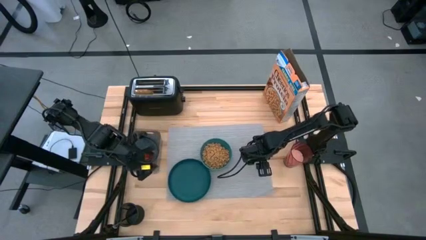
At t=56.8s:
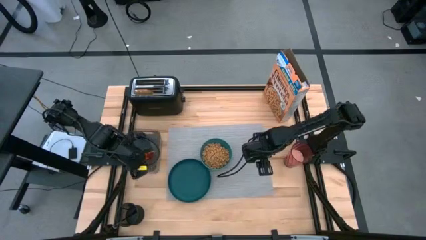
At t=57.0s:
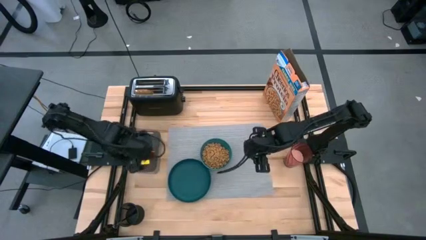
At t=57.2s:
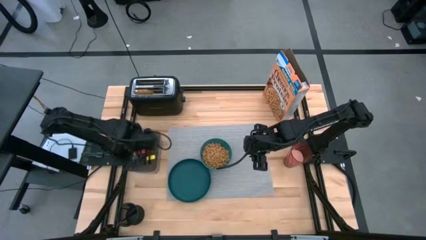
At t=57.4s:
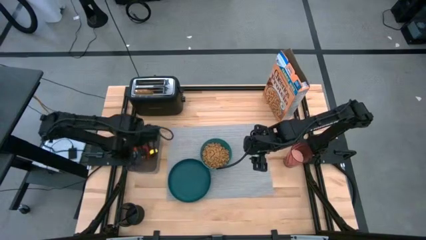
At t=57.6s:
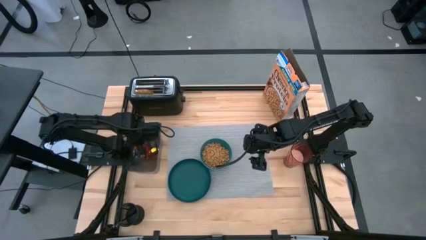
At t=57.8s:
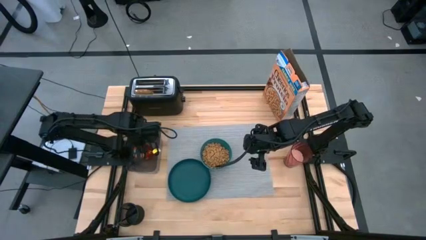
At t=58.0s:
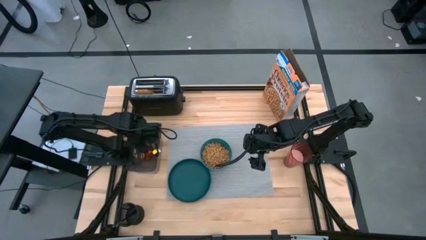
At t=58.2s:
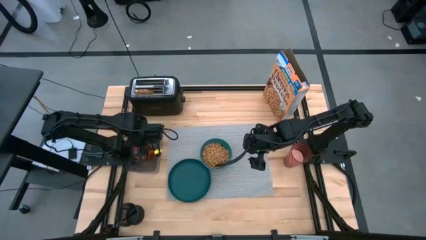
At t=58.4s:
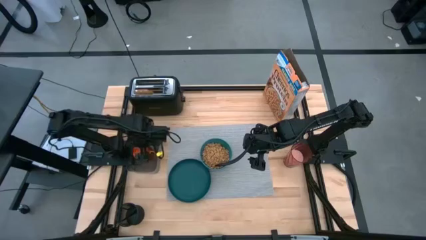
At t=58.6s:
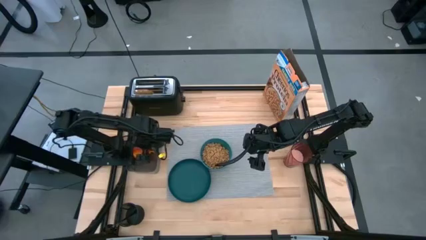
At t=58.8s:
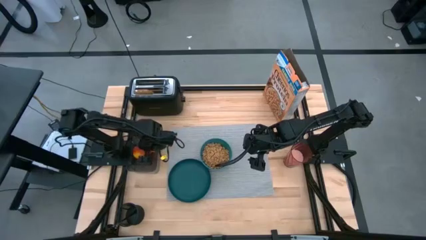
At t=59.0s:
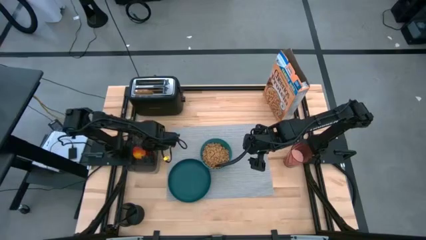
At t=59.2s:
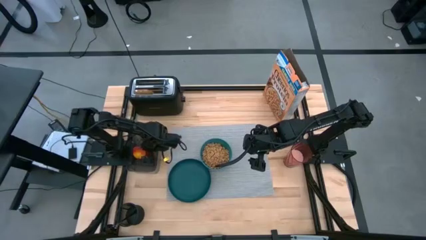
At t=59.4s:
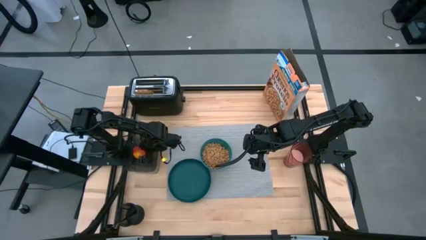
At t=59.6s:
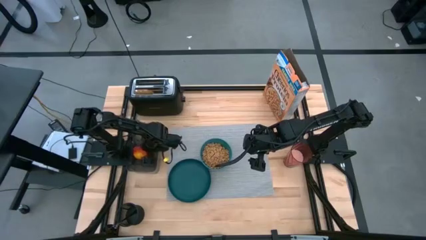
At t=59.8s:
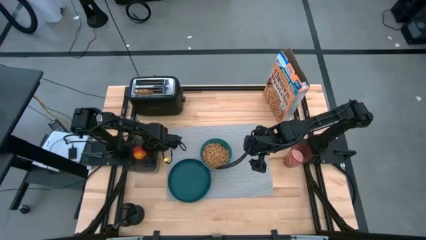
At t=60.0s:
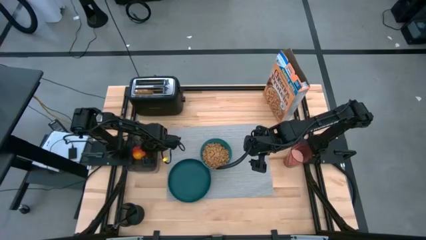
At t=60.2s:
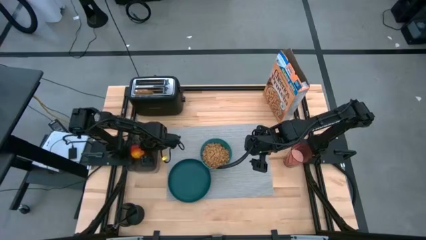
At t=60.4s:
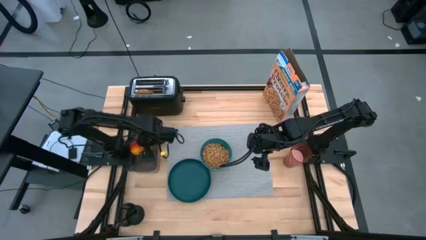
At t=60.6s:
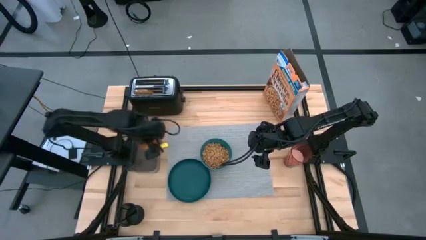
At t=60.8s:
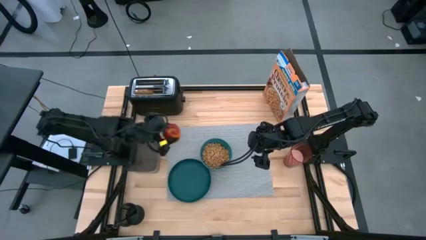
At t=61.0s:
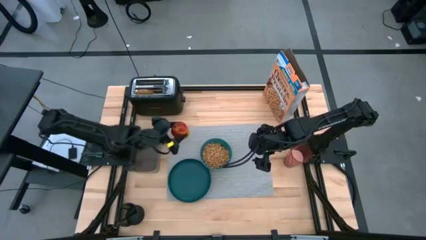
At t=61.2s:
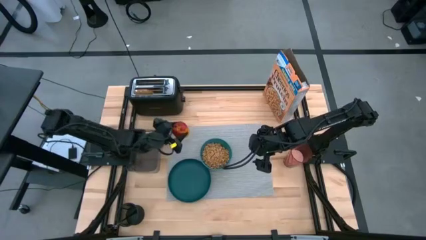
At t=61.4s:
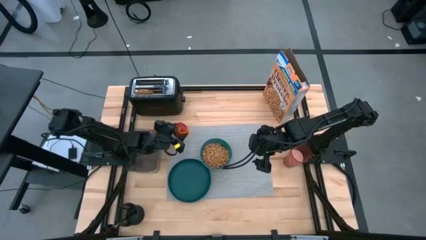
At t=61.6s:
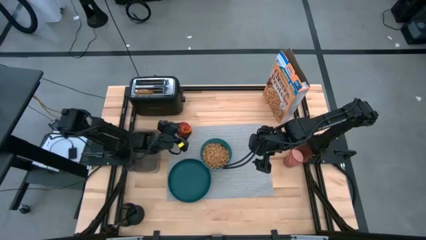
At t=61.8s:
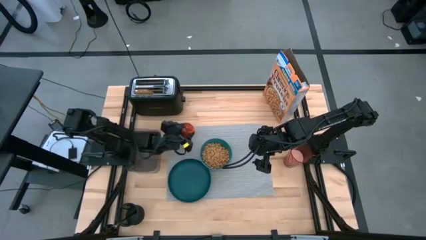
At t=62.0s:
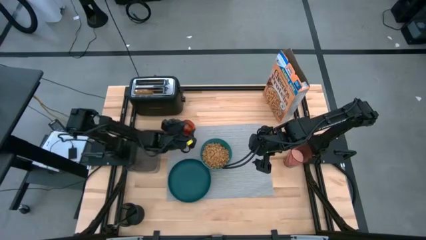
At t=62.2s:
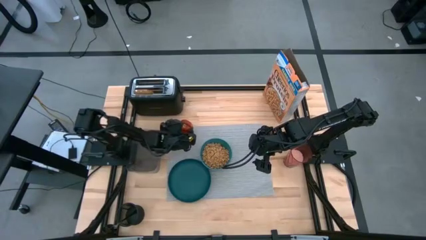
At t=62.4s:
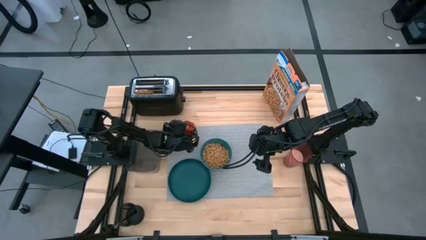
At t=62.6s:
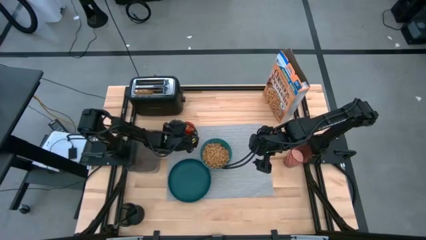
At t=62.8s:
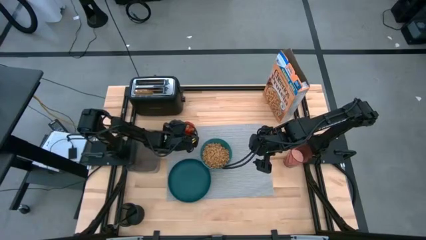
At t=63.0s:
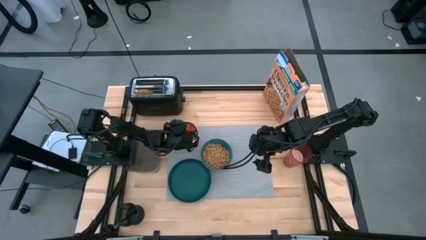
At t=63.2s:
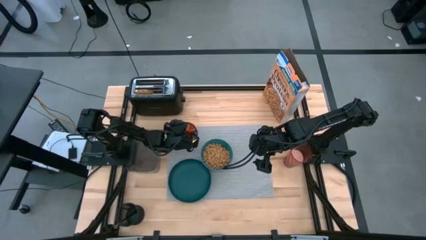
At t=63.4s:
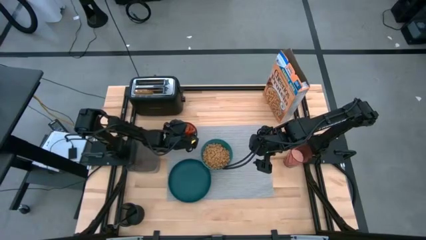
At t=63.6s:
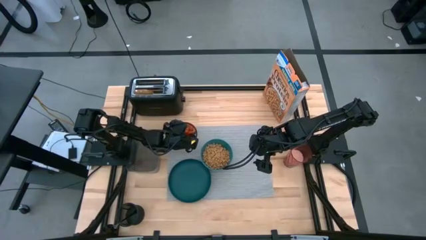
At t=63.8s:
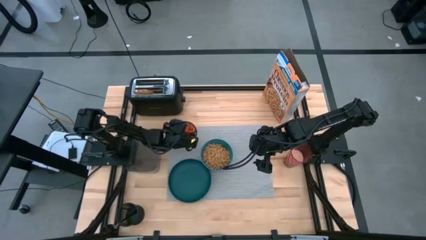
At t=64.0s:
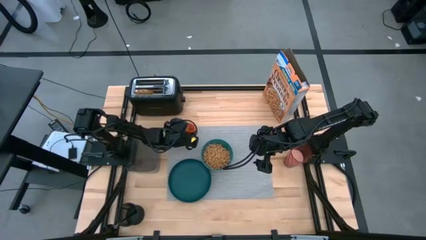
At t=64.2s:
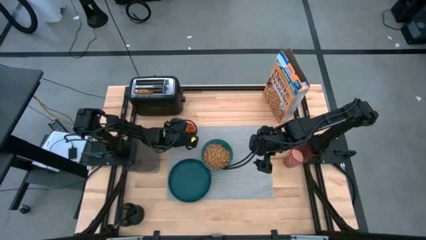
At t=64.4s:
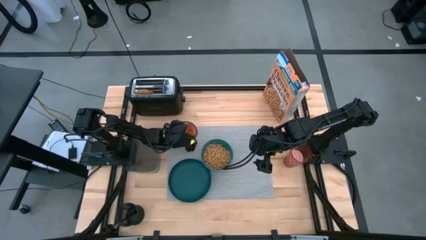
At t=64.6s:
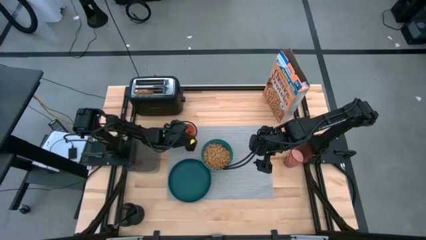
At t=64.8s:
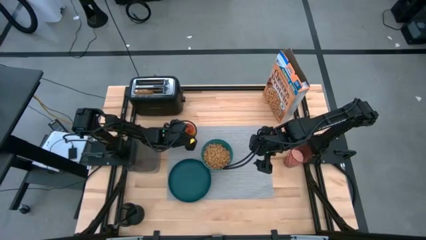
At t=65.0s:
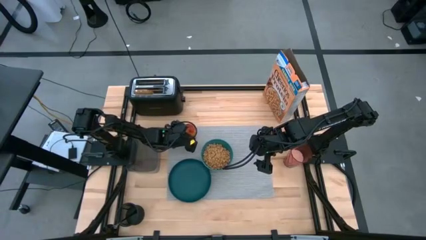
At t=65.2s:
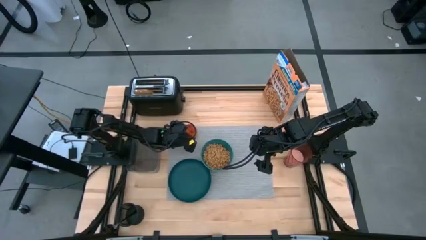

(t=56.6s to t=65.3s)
Task: Arrange a breakfast setting
Put the red apple on the mat

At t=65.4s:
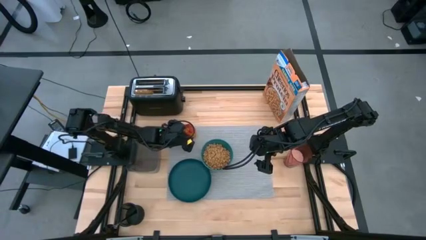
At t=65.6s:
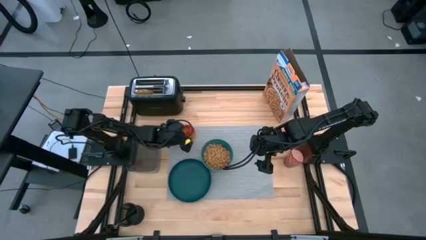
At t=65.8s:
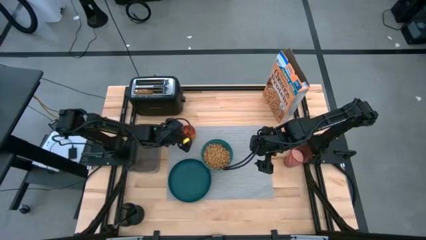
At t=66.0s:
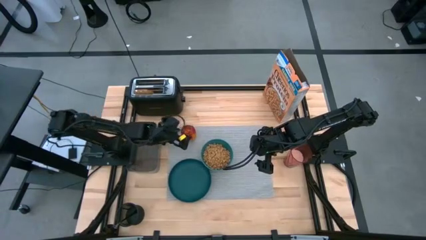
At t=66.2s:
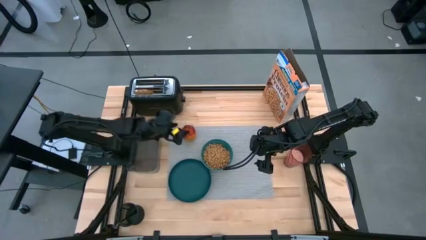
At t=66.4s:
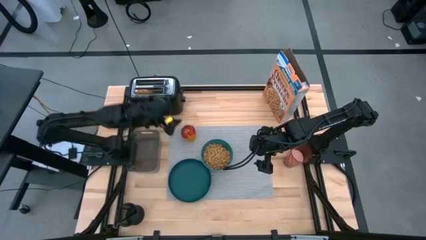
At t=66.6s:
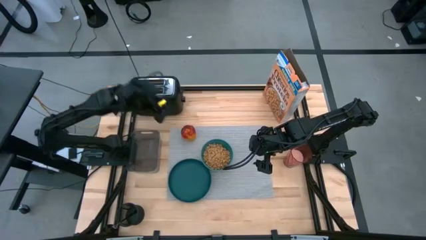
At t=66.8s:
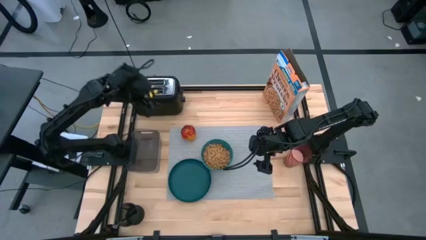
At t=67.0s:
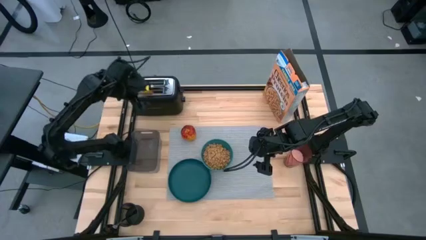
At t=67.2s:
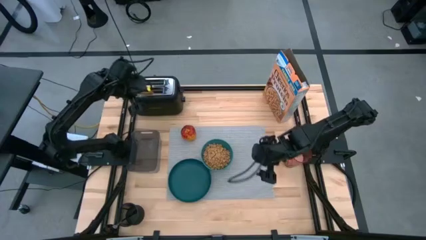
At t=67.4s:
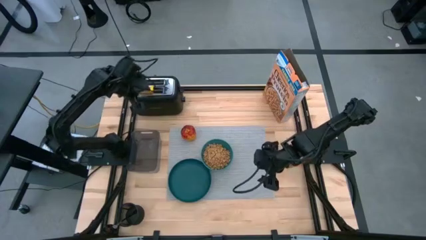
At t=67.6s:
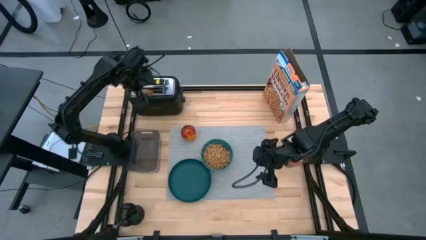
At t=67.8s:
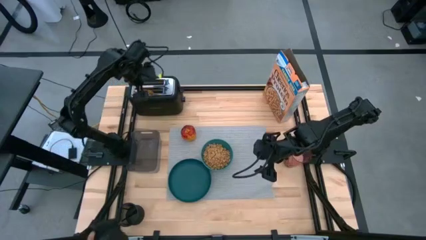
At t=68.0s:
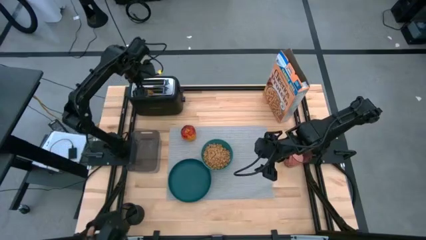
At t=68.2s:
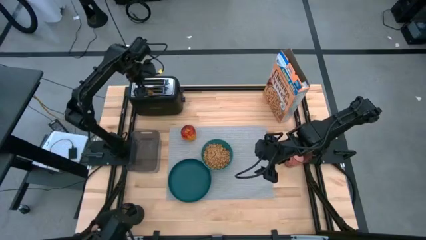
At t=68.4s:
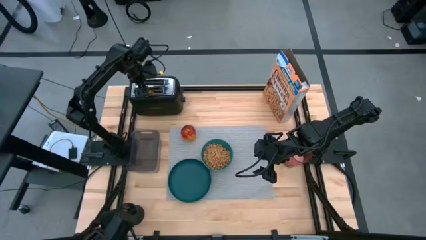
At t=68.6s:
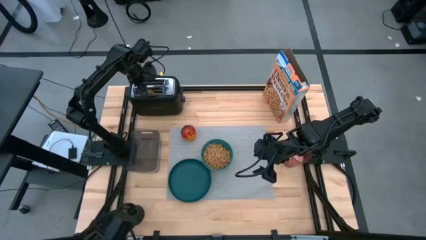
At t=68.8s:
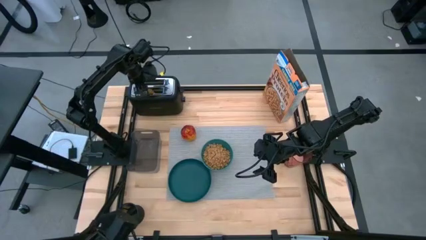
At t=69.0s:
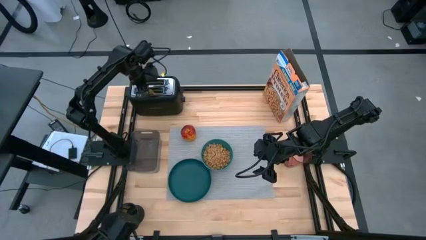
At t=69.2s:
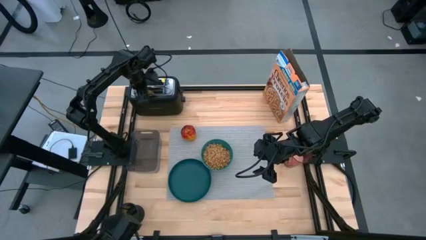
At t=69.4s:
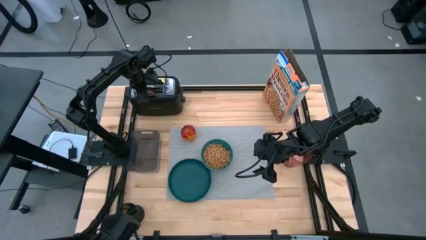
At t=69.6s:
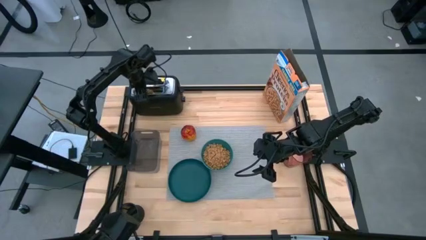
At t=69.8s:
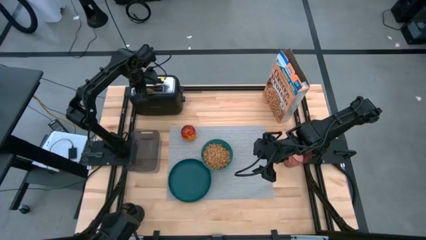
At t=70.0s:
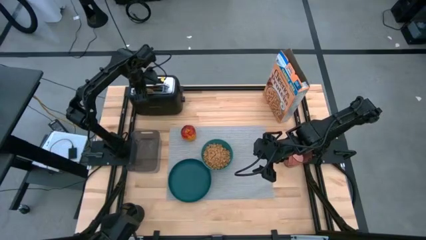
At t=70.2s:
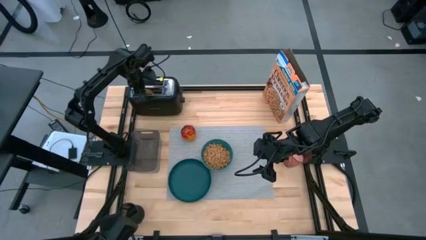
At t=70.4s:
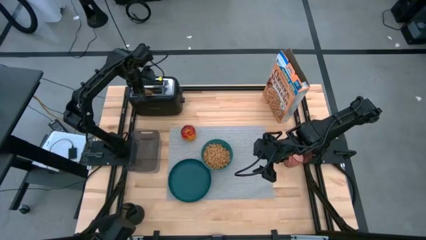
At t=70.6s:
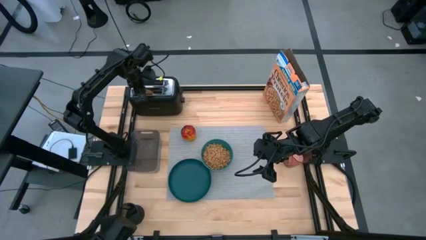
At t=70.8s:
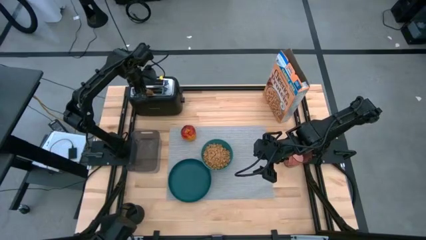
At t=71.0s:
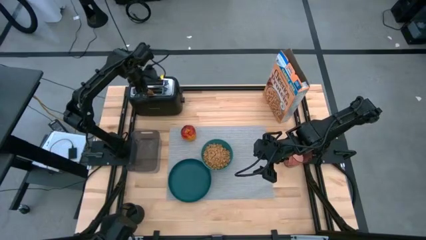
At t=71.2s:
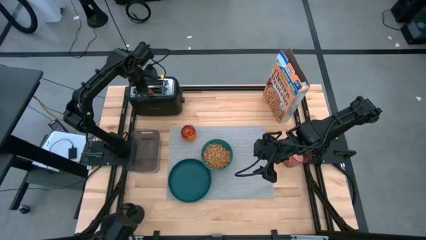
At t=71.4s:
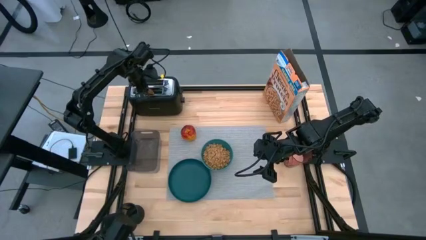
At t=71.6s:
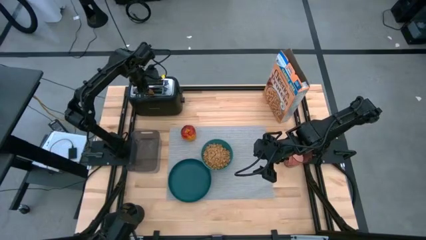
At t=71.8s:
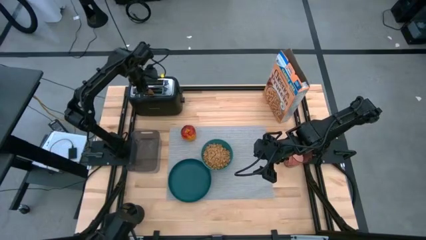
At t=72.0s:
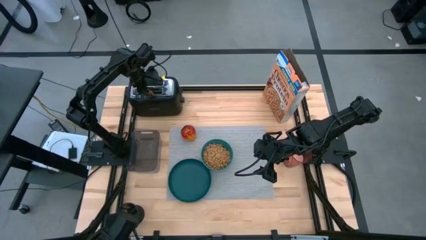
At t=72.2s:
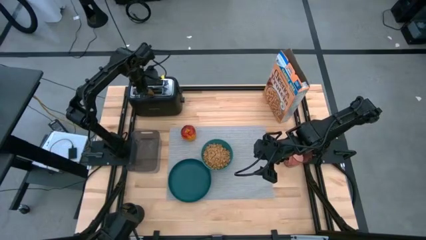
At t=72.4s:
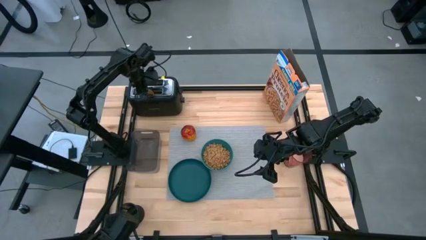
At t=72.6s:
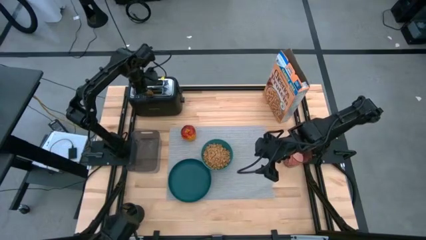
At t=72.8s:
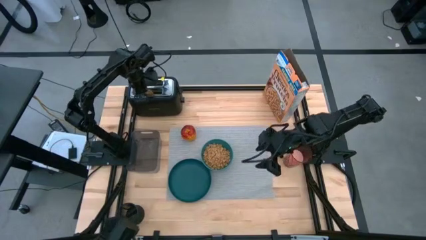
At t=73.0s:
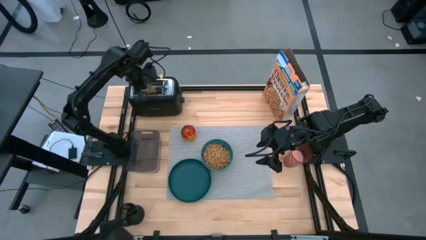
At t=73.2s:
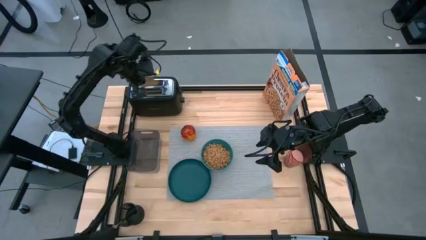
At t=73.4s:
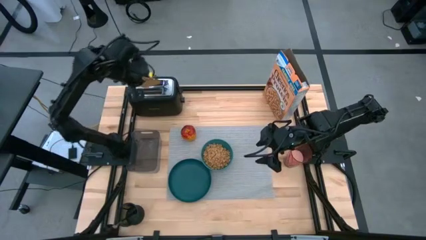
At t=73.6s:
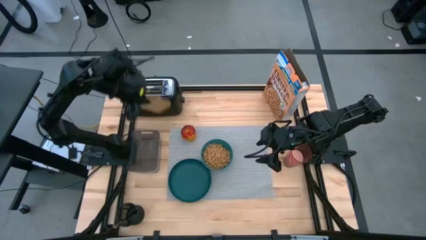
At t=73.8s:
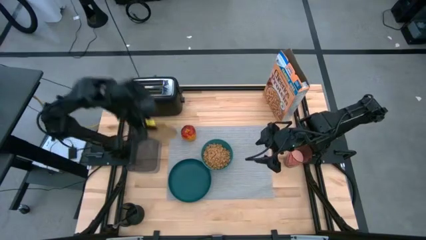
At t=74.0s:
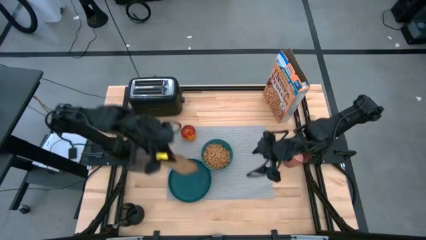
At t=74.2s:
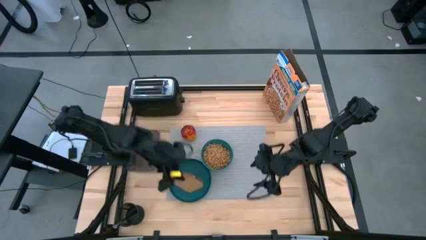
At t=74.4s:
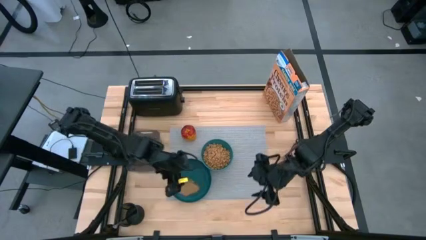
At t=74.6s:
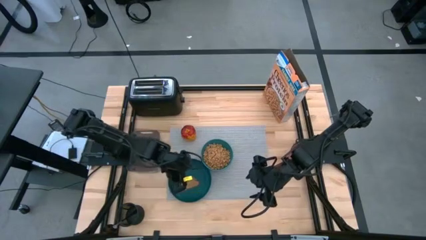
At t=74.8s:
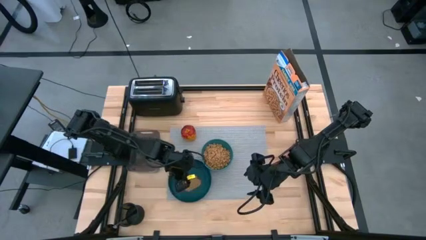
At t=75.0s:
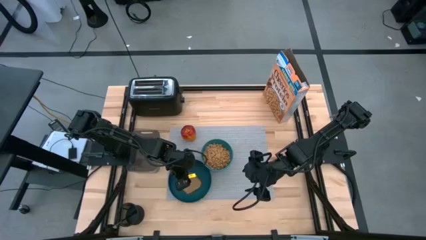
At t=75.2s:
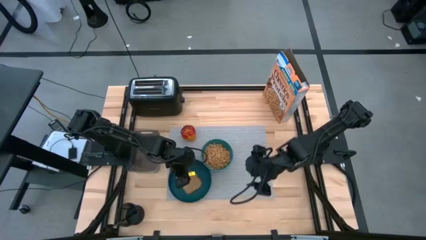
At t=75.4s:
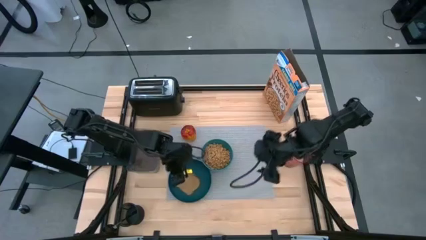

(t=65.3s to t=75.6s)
Put the toasted bread on top of the blue plate
